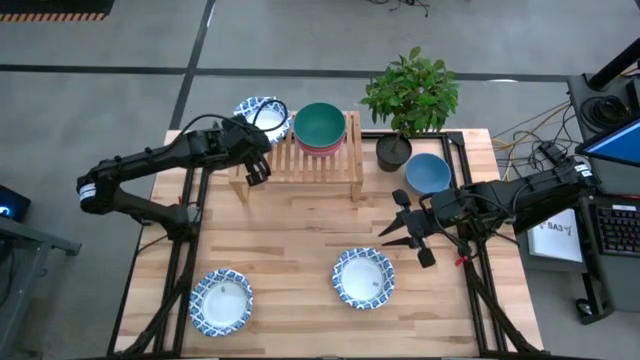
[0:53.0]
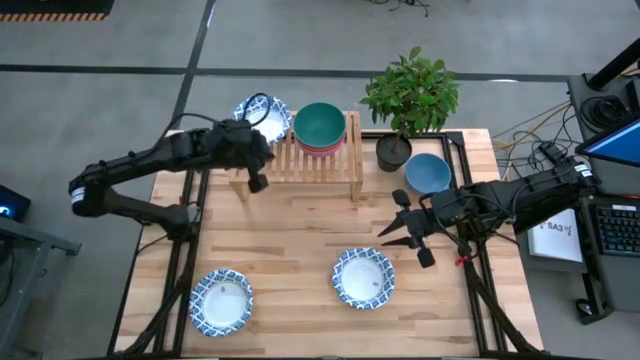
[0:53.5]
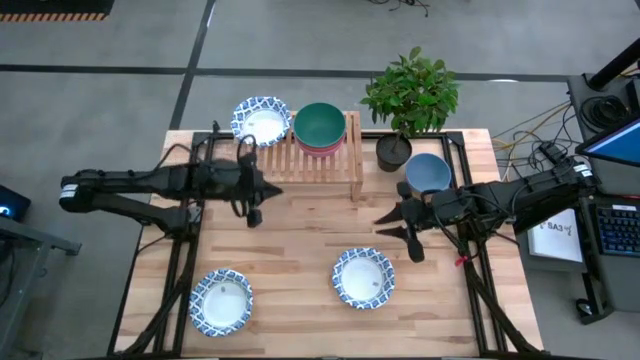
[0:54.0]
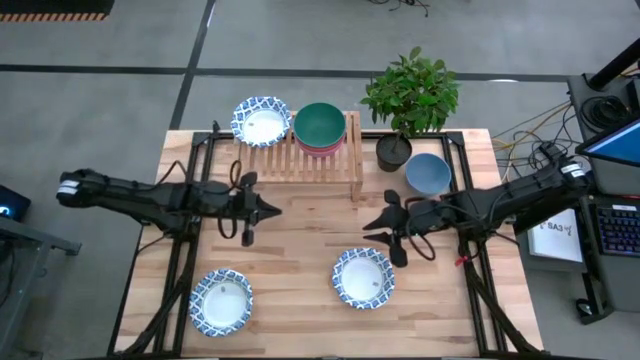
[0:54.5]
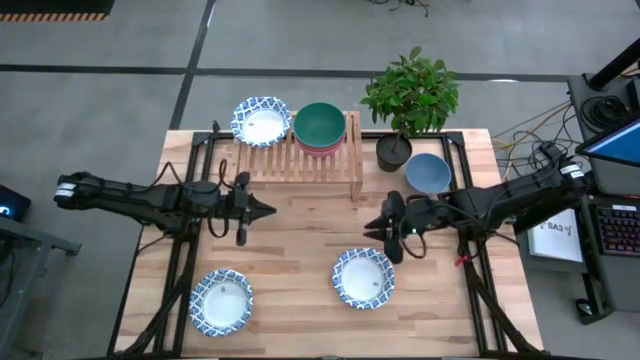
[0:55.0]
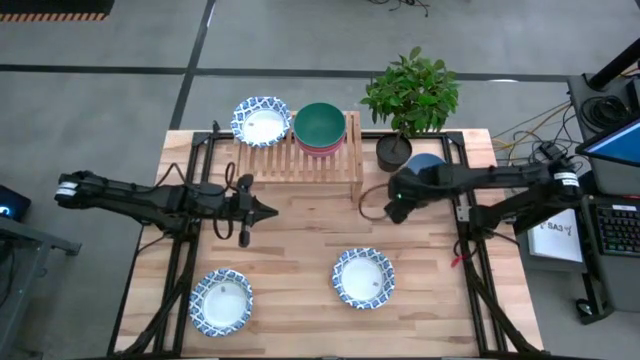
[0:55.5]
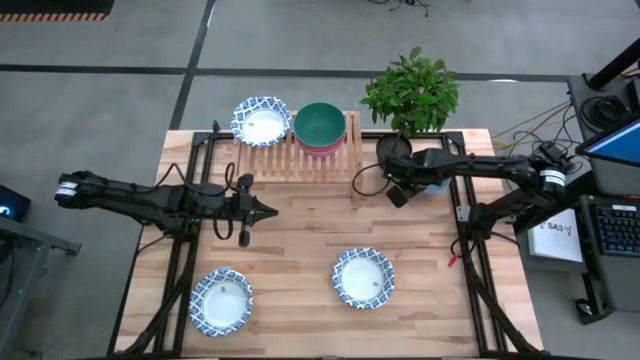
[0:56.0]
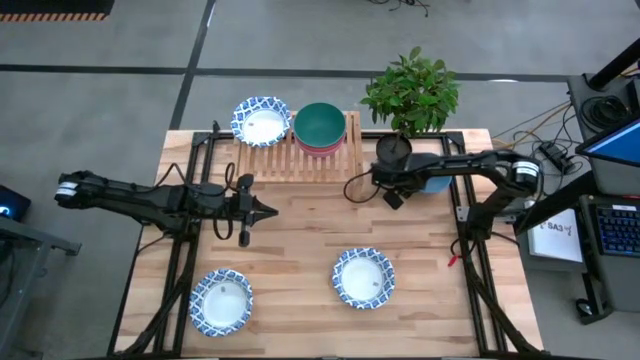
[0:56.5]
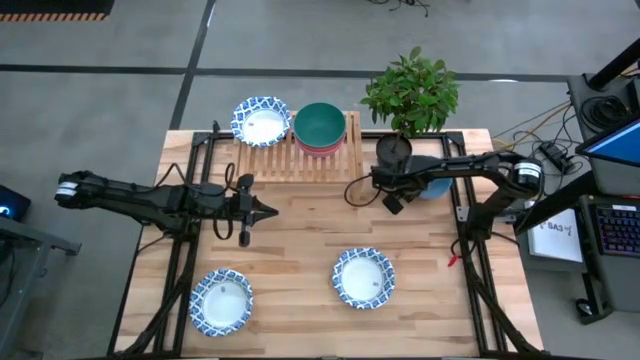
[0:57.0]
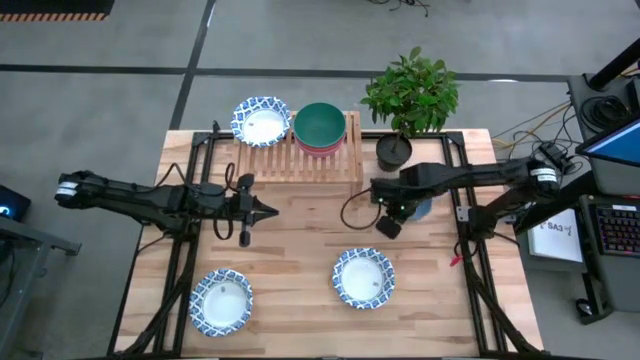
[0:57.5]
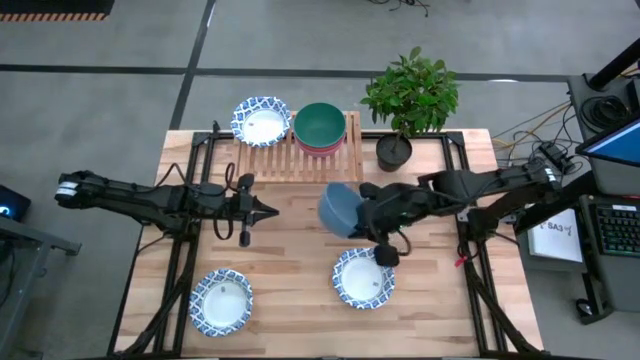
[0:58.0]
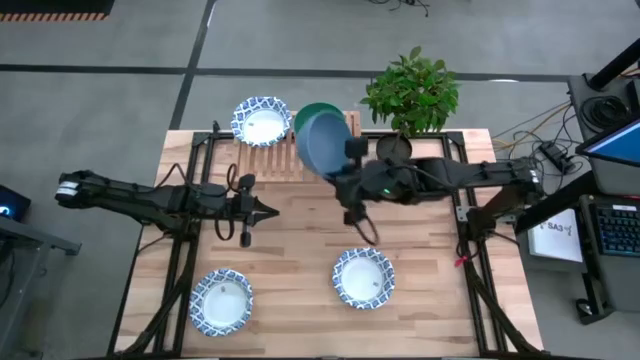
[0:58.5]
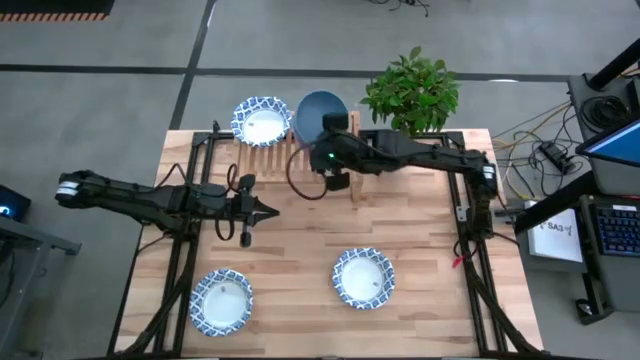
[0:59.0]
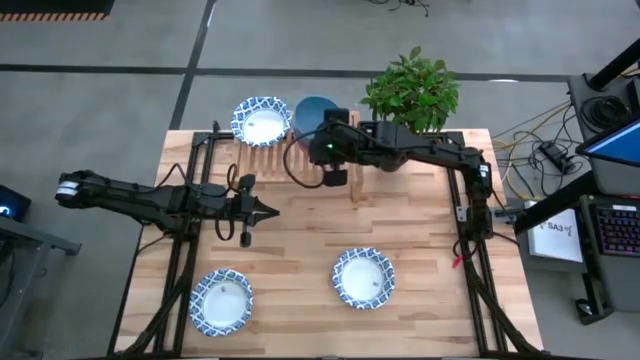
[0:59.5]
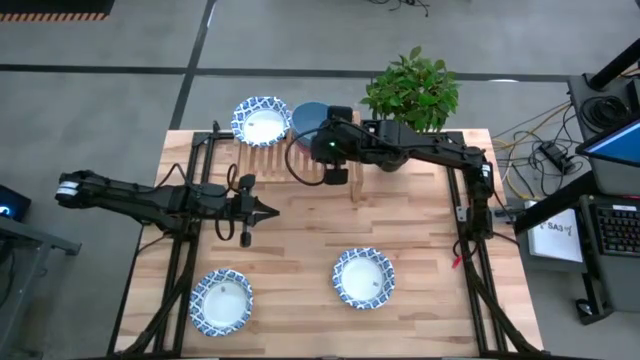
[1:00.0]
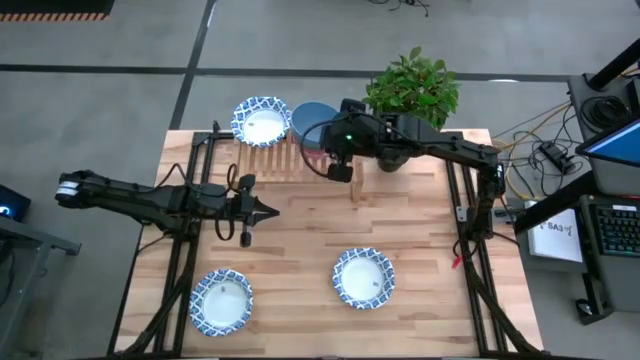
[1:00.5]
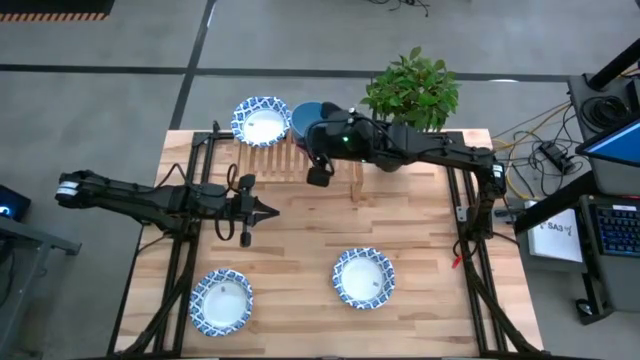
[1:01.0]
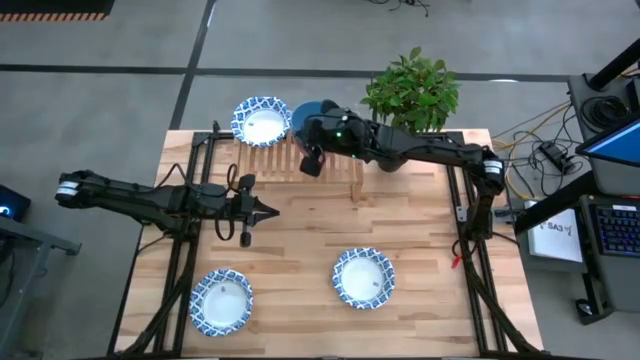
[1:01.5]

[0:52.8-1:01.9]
Task: Place and stack bowls onto a shelf
Stack the blue bowl on top on the green bowl on the shelf

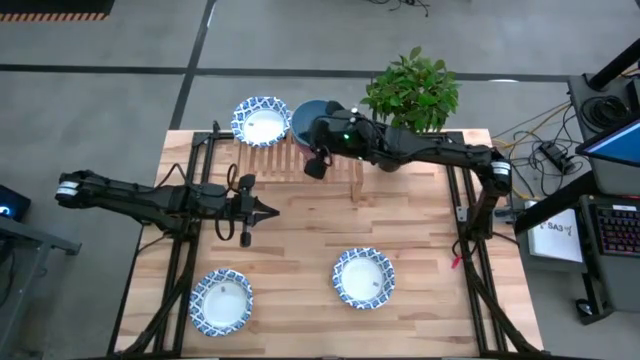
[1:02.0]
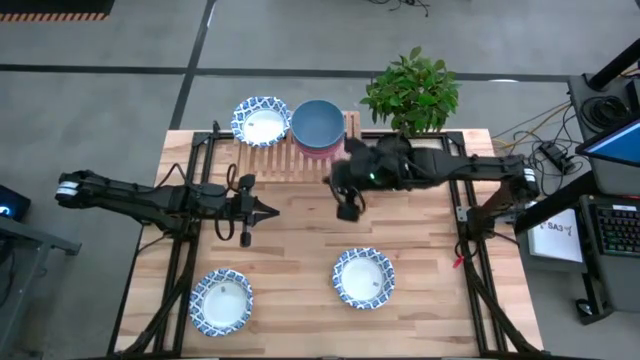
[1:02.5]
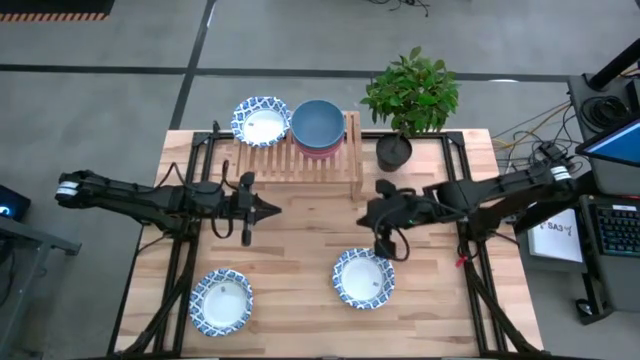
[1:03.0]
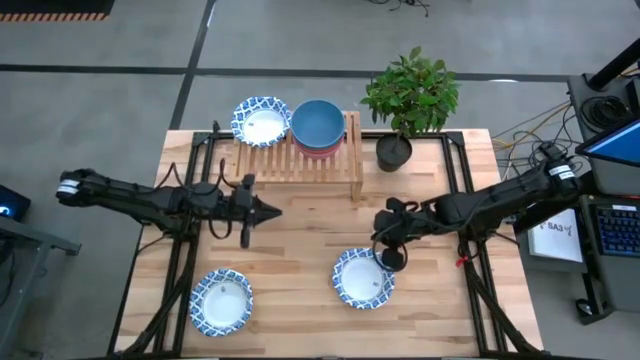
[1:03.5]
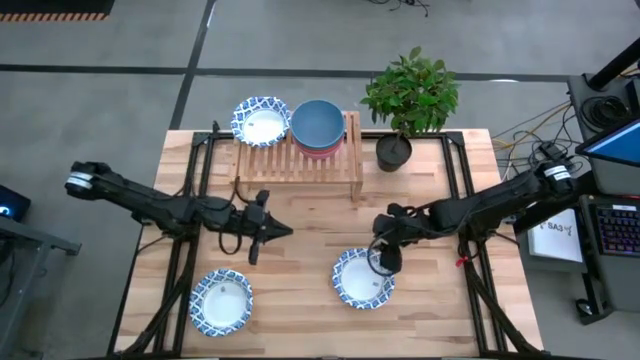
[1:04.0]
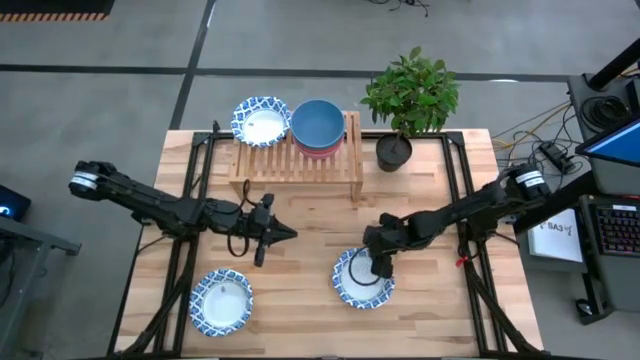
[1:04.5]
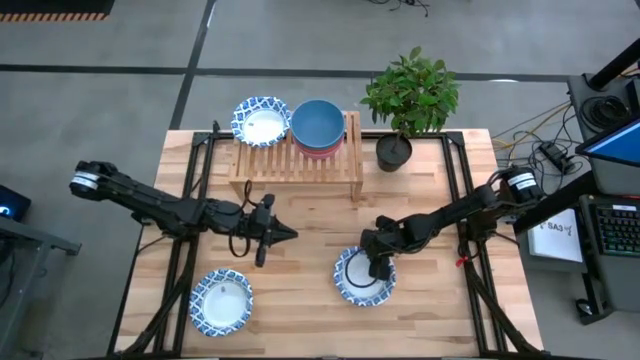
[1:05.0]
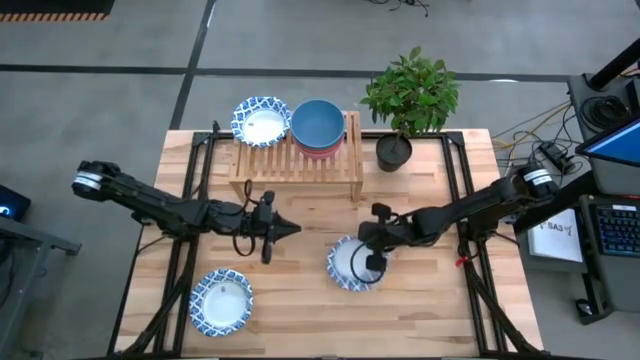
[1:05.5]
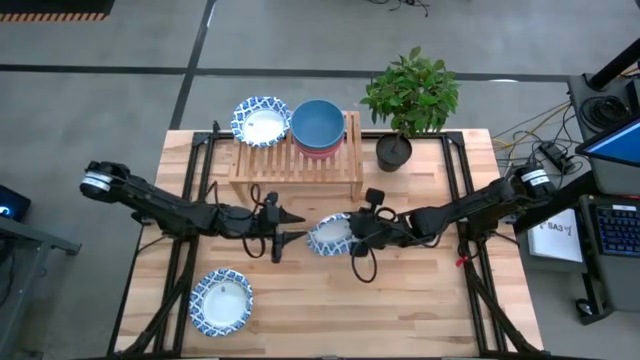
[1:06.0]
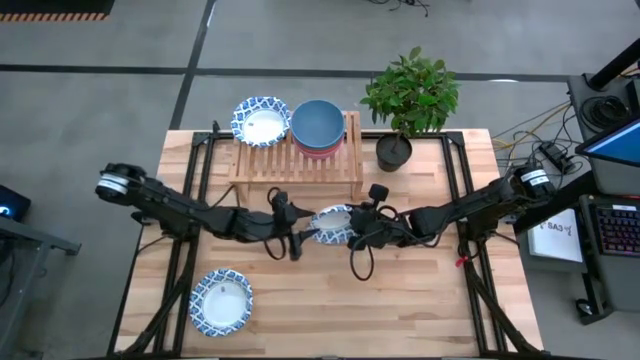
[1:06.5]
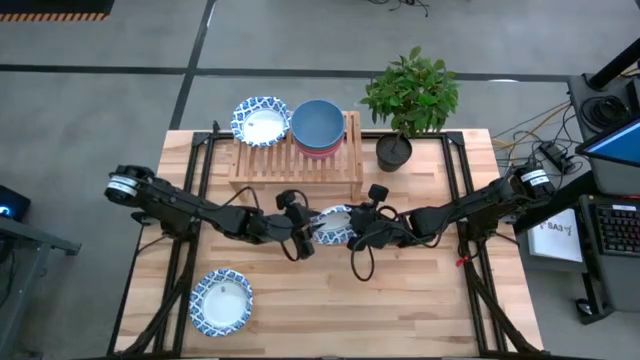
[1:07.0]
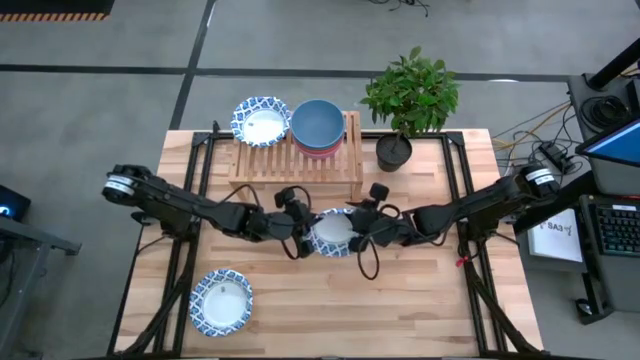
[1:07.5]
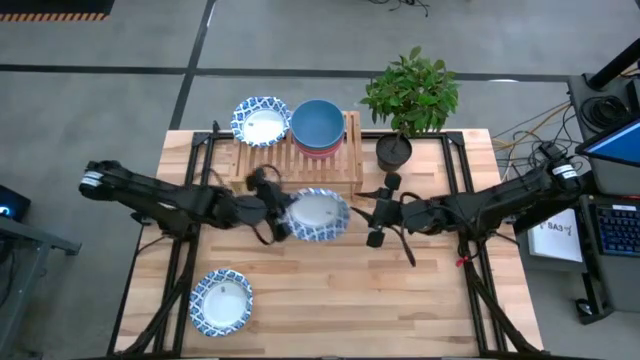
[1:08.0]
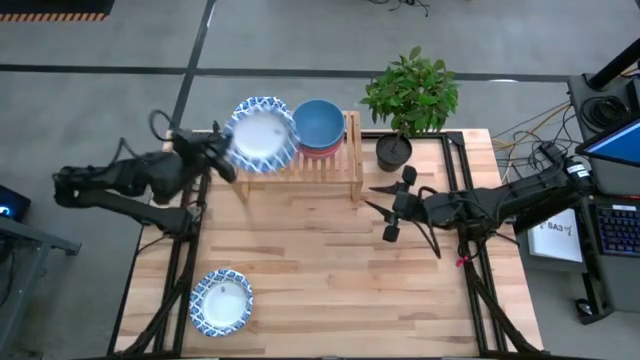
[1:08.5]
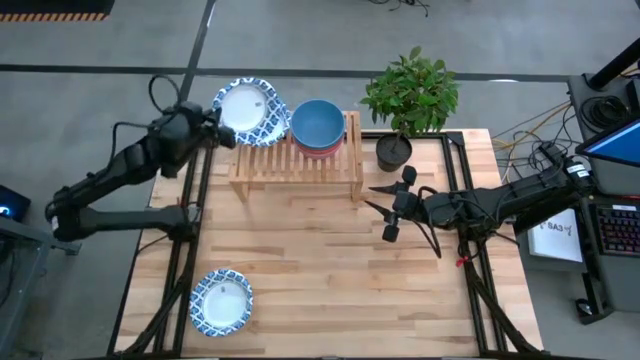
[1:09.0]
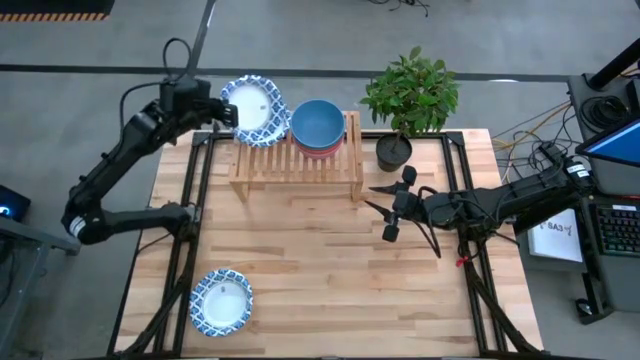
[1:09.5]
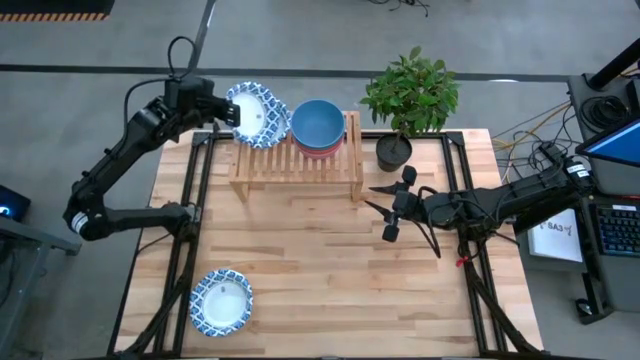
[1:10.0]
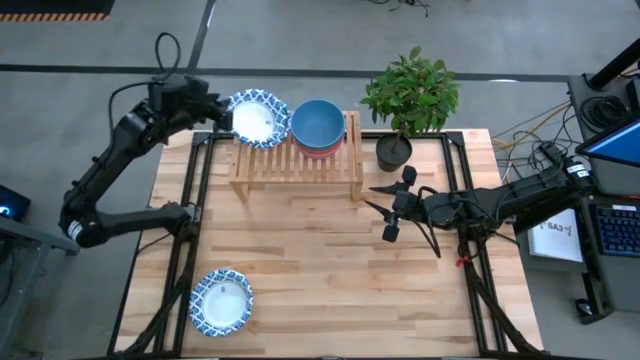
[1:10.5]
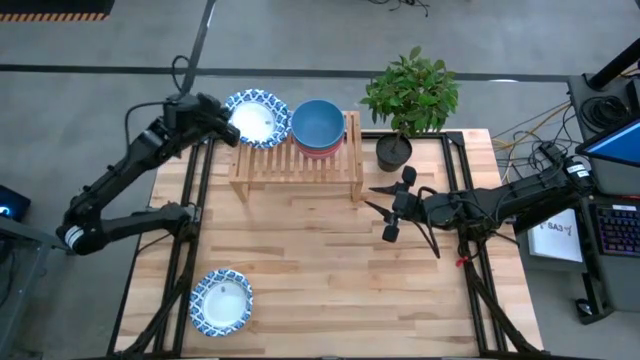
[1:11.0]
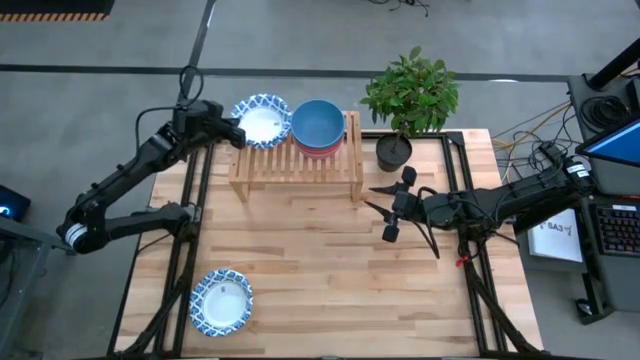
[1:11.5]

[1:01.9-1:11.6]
Stack the white bowl on the top of the other white bowl on the shelf
